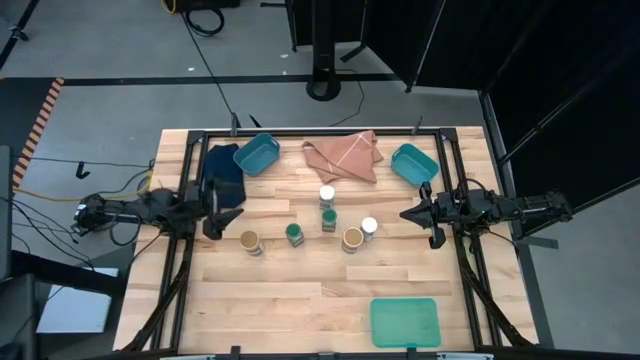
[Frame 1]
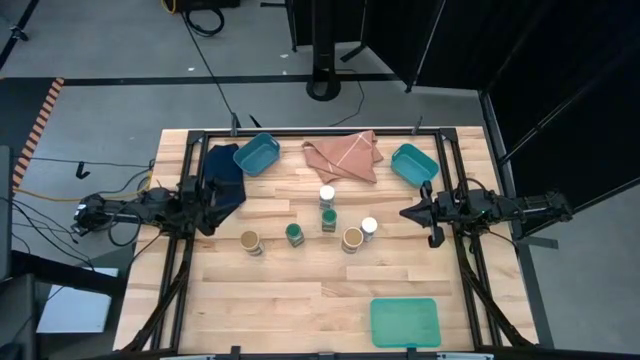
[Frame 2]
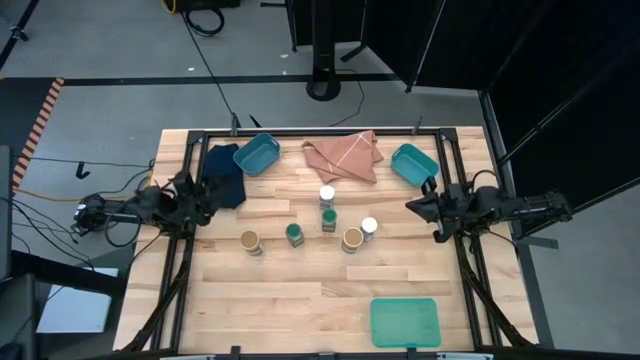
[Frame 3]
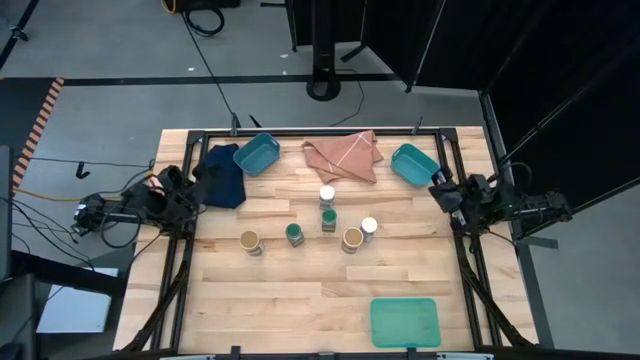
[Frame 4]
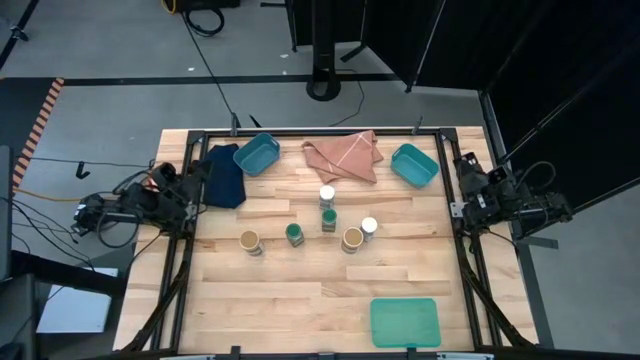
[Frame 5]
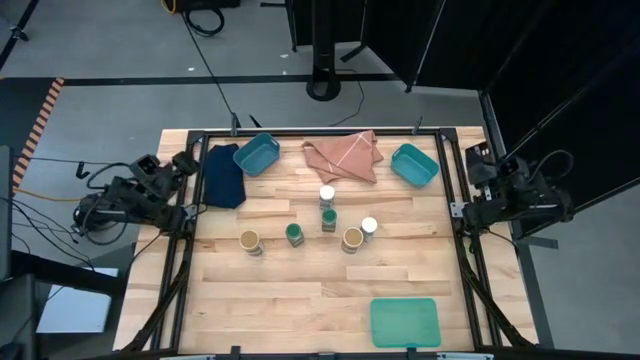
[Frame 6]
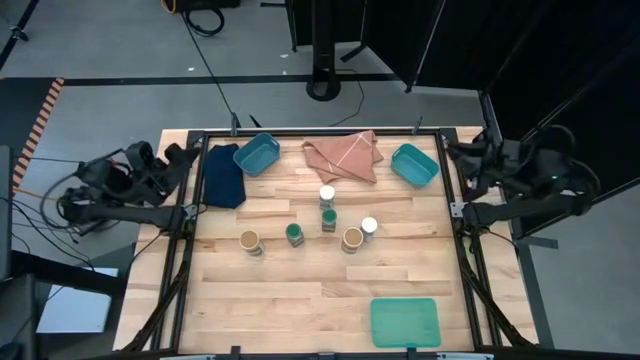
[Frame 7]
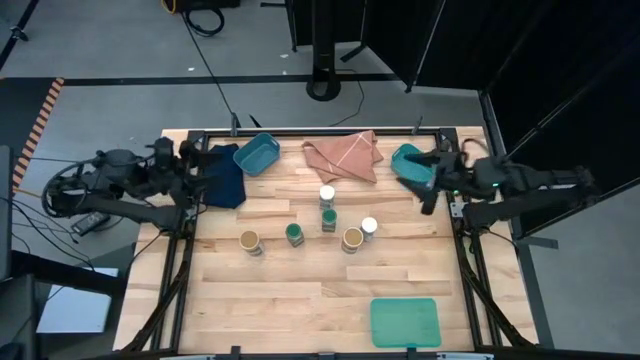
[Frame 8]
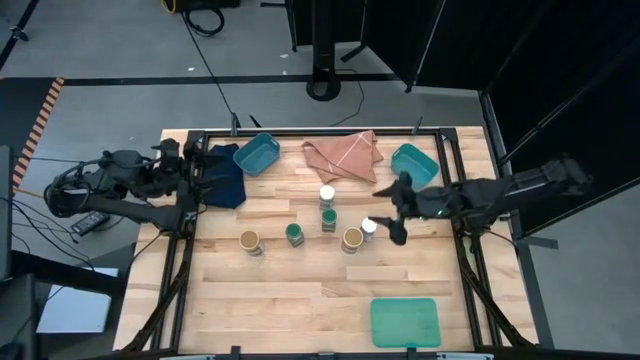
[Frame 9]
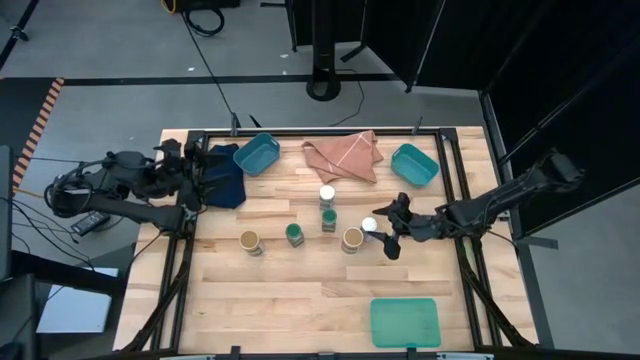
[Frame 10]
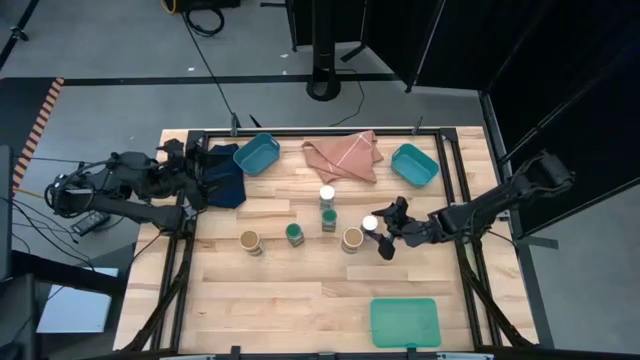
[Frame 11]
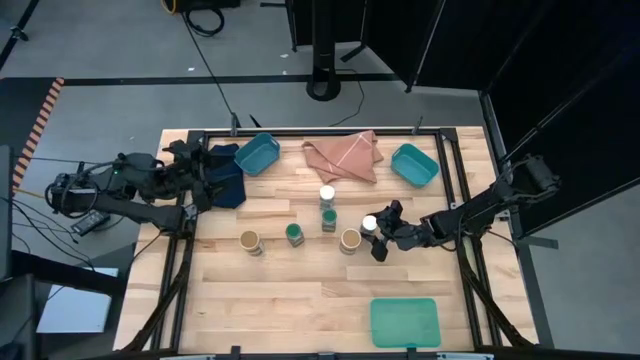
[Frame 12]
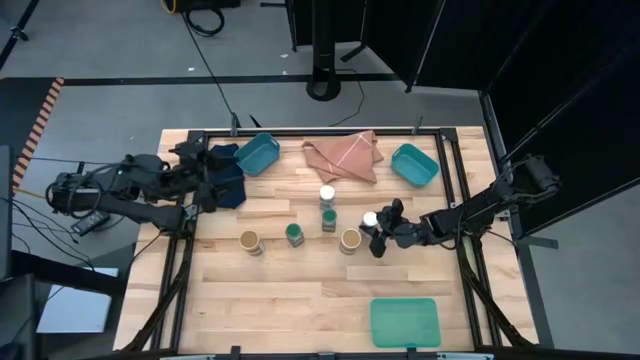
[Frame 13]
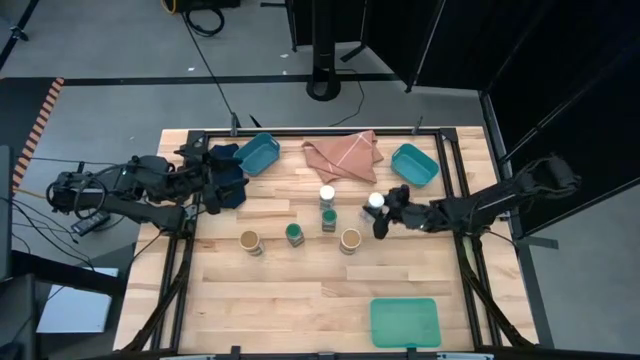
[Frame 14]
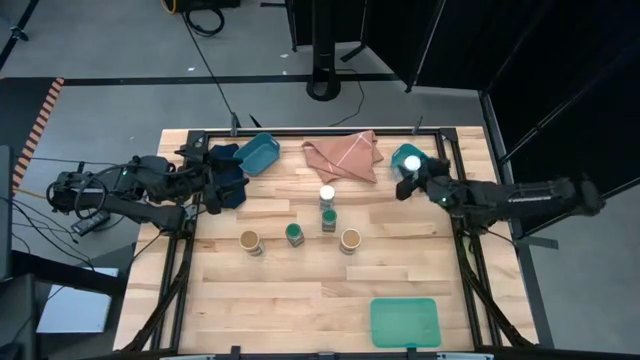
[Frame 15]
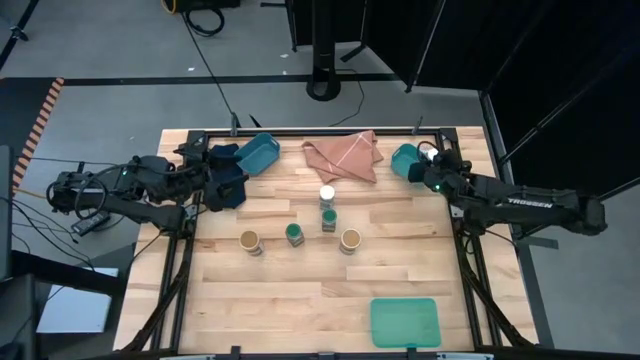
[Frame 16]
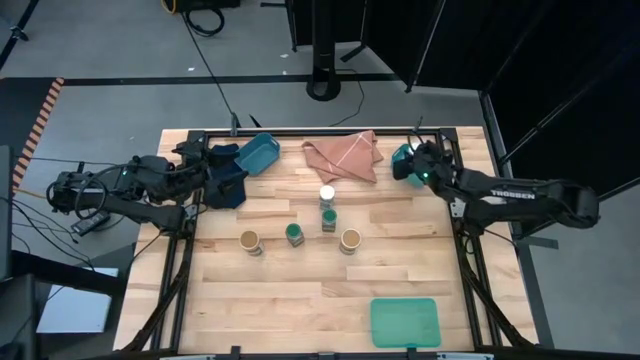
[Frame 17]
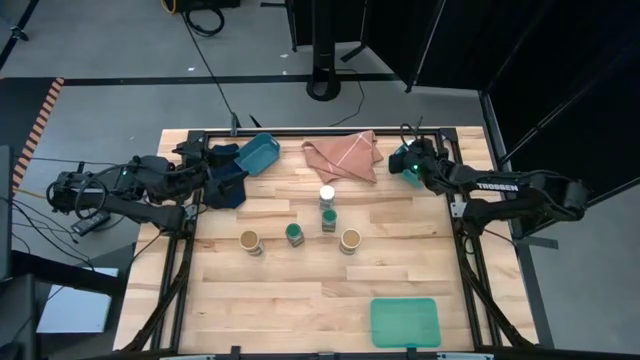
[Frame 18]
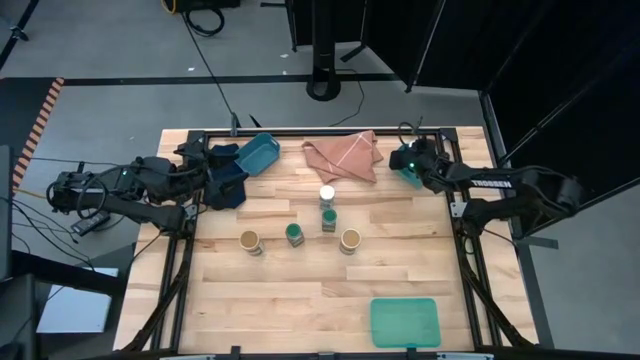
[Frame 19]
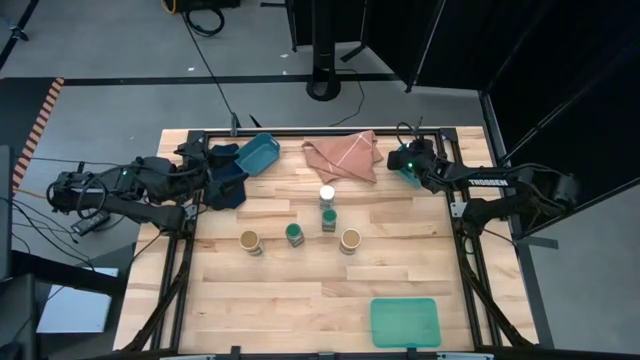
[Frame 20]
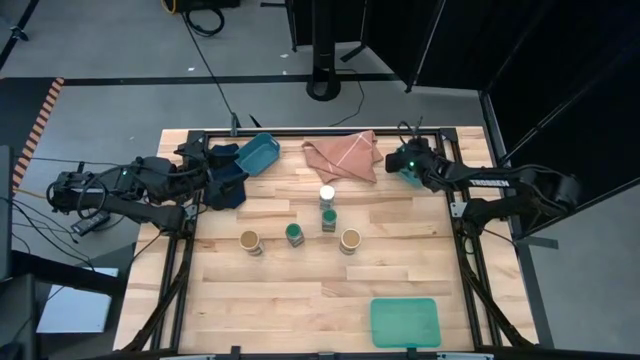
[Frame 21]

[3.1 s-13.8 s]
Task: Sort spices by type
Put the right white seasoning bottle into the green bin

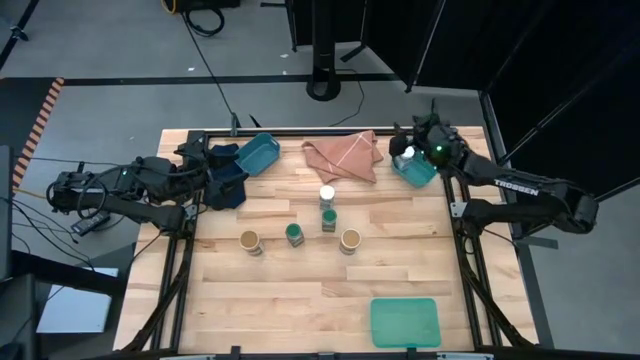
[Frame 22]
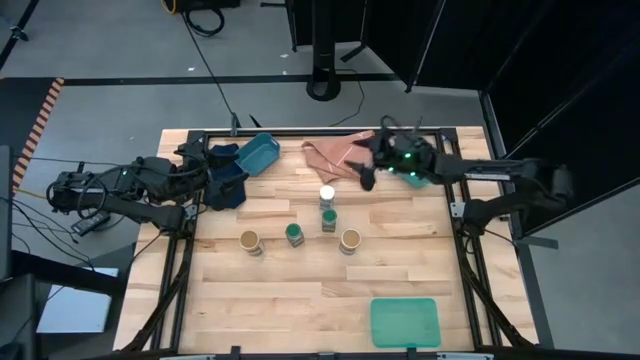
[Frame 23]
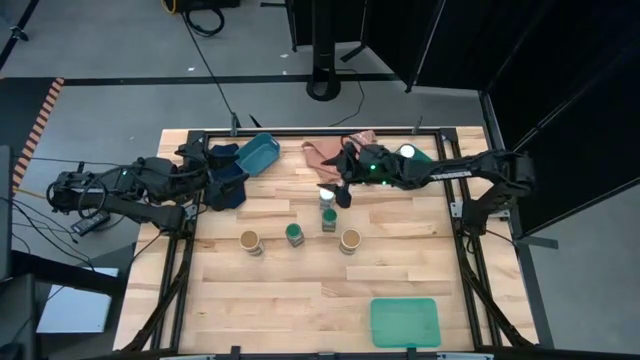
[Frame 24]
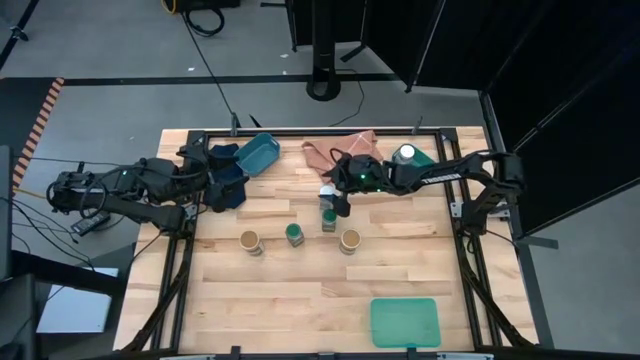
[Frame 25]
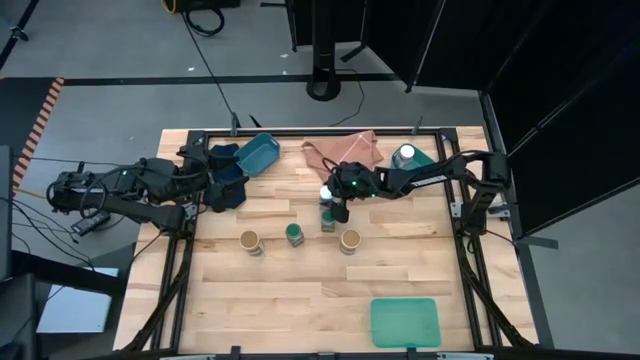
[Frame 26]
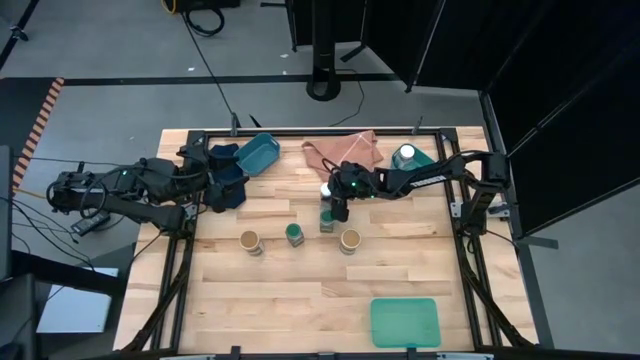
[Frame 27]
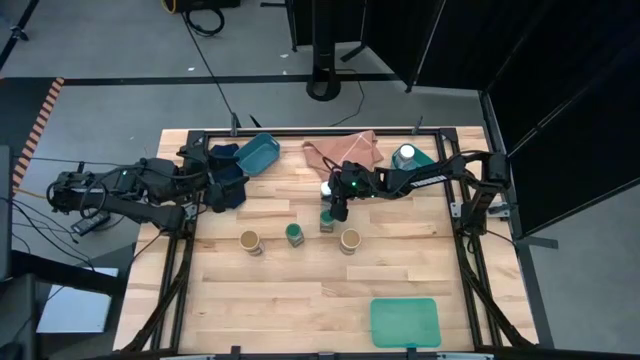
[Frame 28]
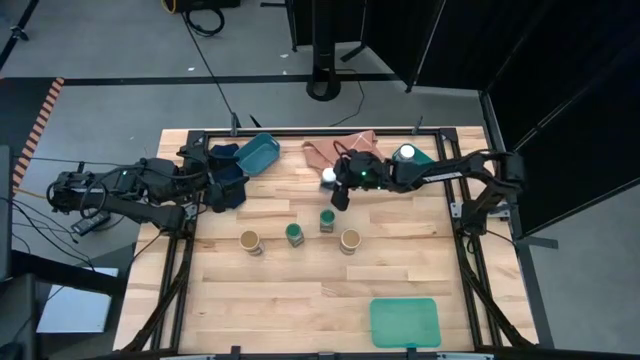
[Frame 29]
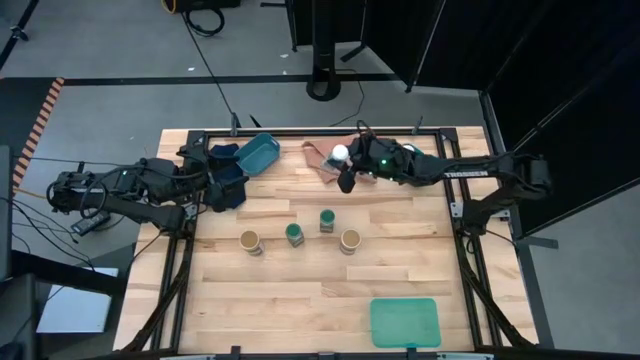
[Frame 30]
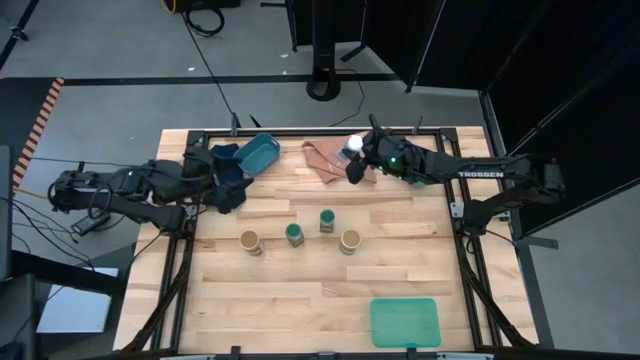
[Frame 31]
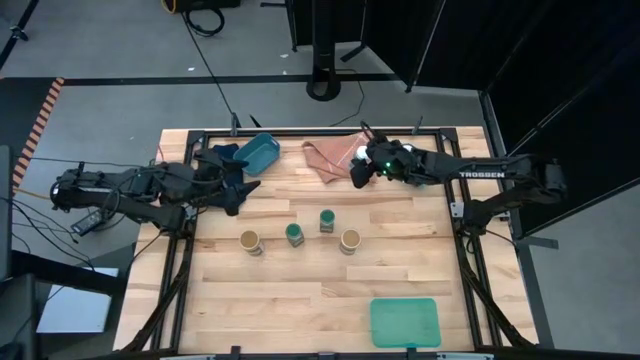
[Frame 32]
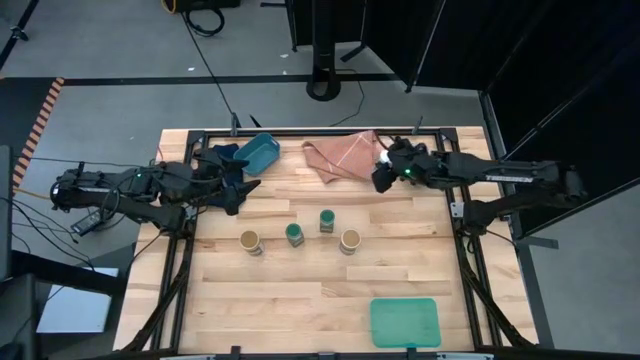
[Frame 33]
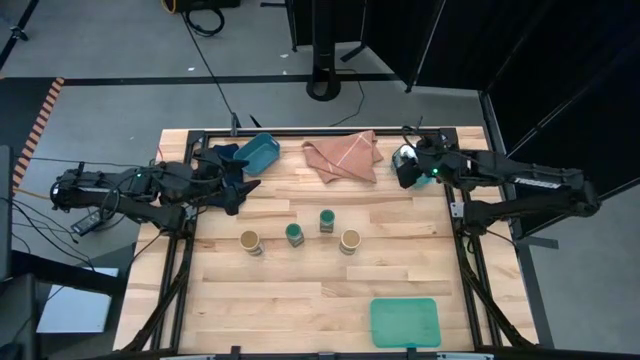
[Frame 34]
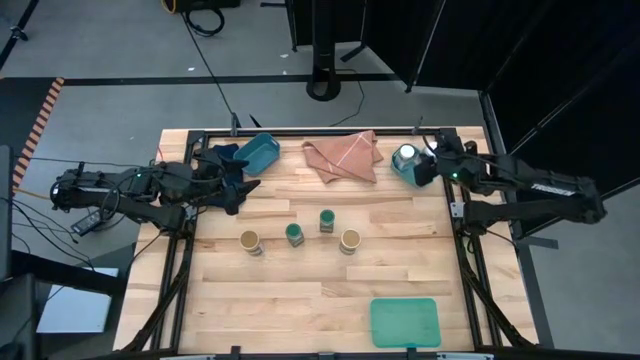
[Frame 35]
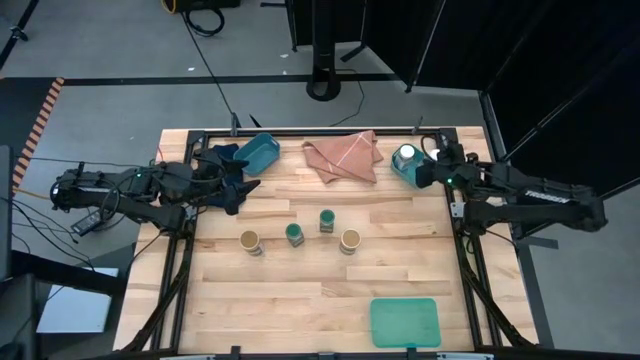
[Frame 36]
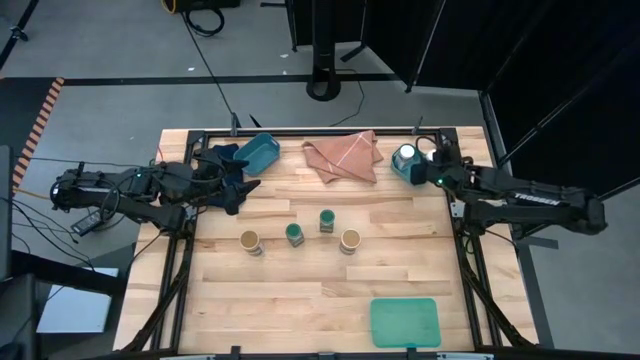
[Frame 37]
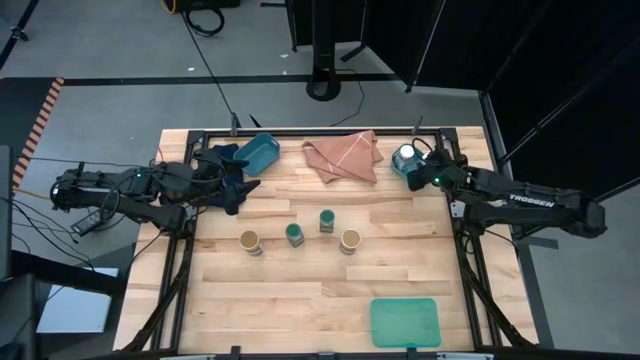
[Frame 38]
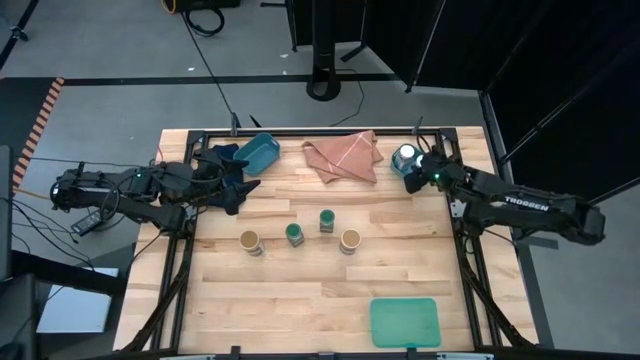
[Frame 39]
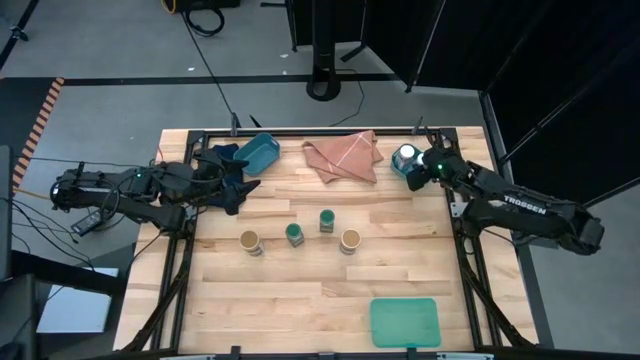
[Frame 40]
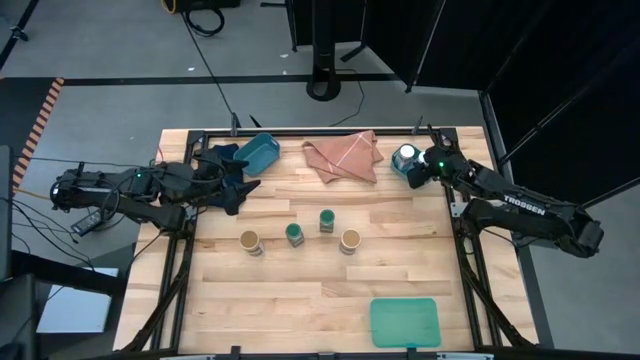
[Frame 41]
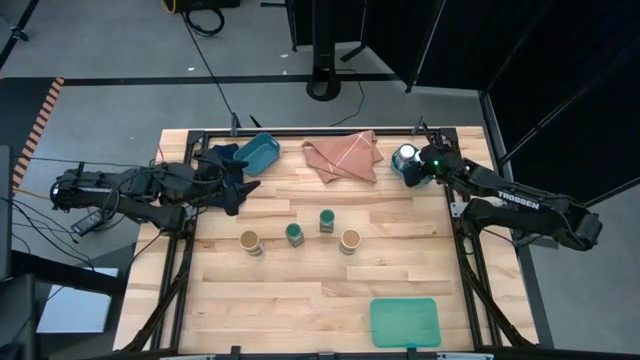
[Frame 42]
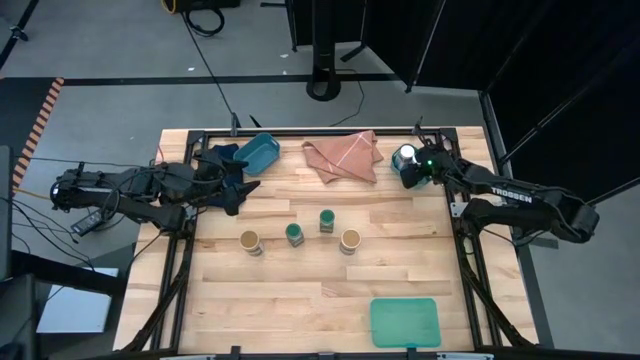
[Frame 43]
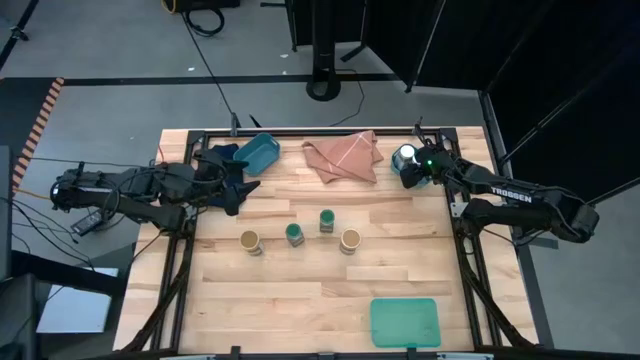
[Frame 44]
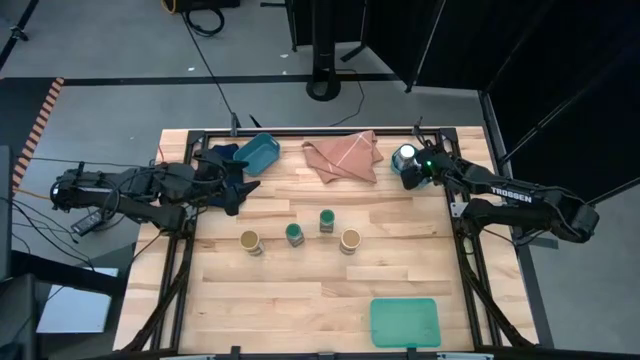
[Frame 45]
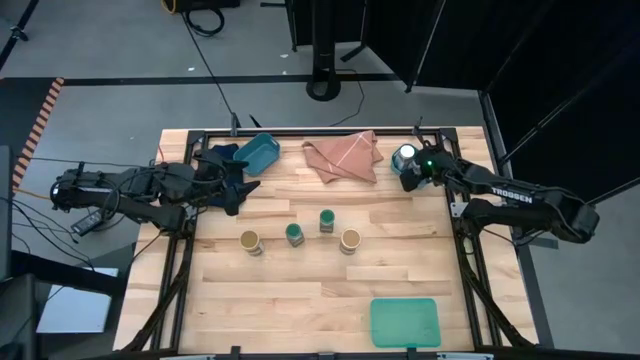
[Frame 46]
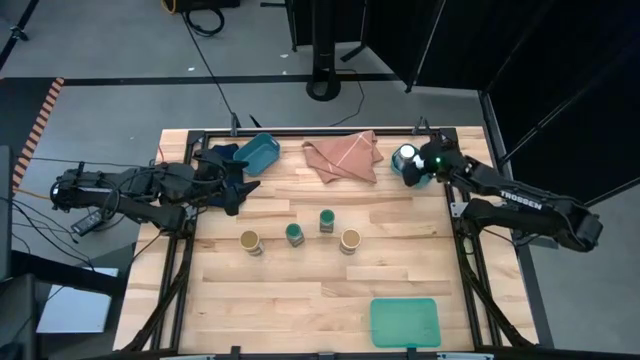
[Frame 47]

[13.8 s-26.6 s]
Put the white seasoning bottle into the green bin
